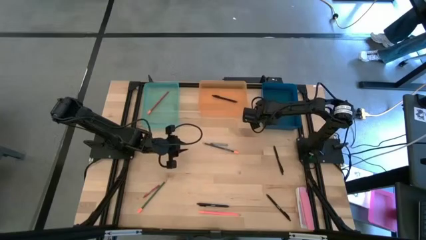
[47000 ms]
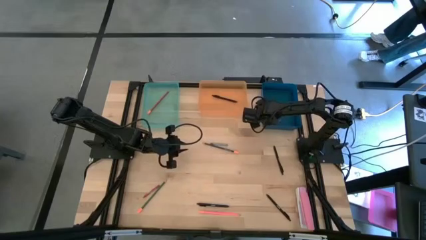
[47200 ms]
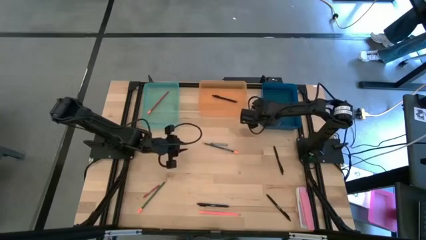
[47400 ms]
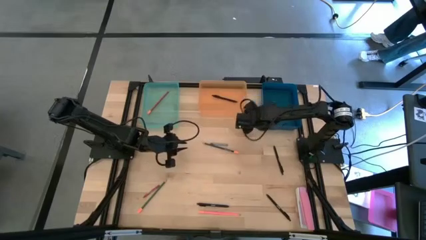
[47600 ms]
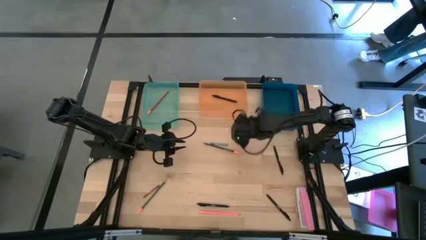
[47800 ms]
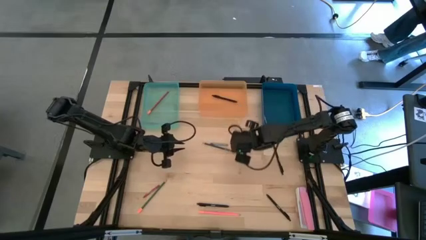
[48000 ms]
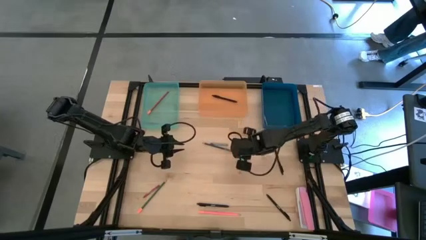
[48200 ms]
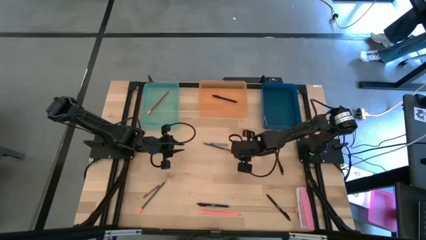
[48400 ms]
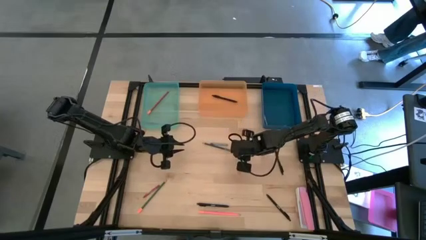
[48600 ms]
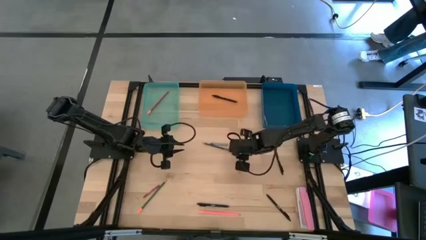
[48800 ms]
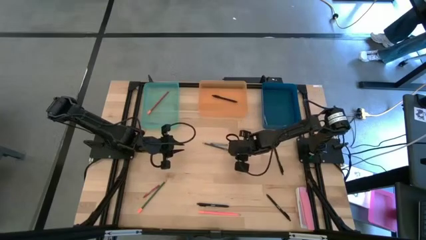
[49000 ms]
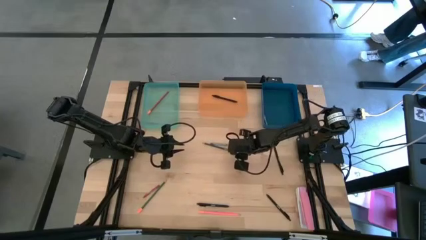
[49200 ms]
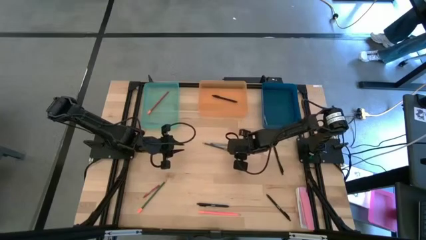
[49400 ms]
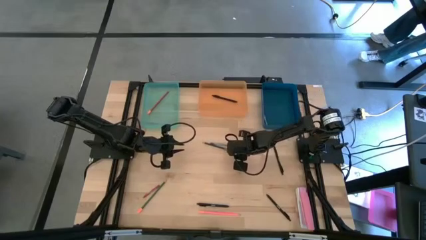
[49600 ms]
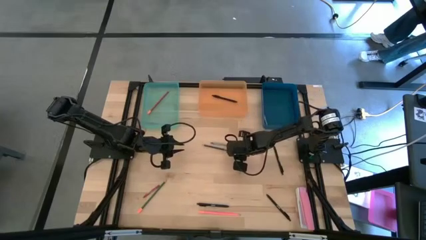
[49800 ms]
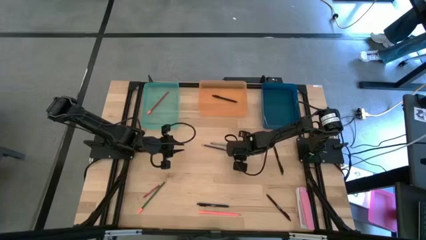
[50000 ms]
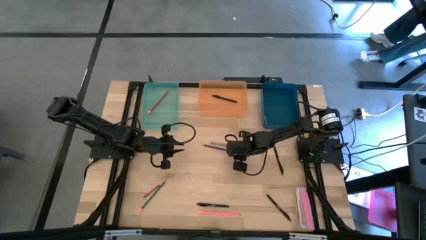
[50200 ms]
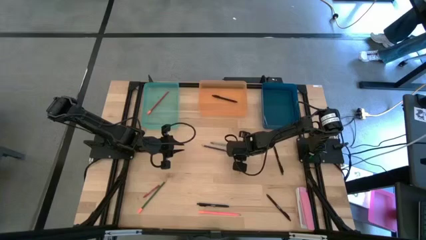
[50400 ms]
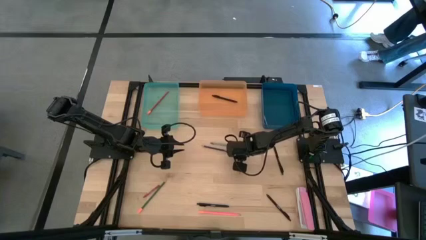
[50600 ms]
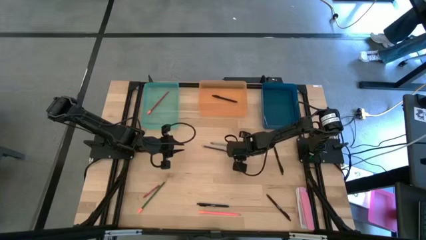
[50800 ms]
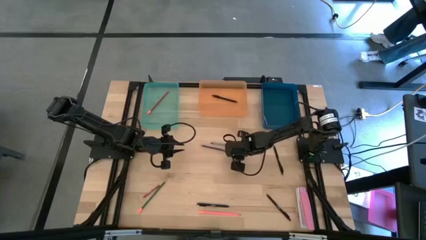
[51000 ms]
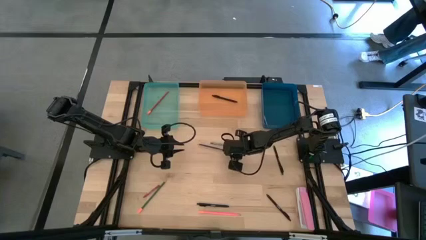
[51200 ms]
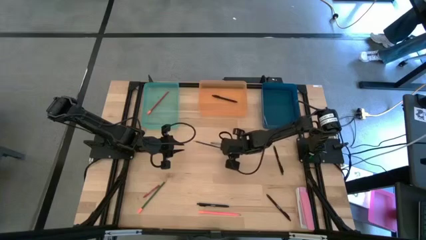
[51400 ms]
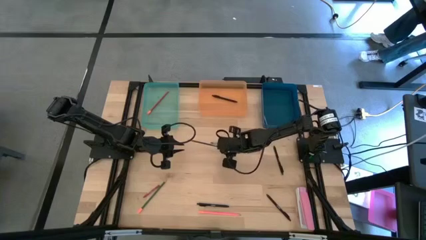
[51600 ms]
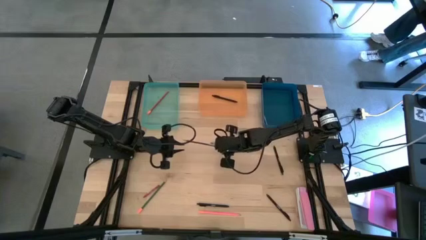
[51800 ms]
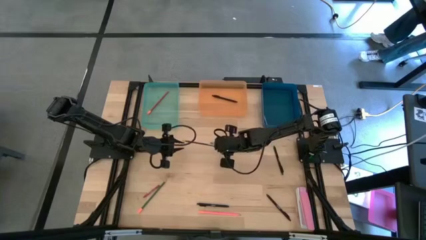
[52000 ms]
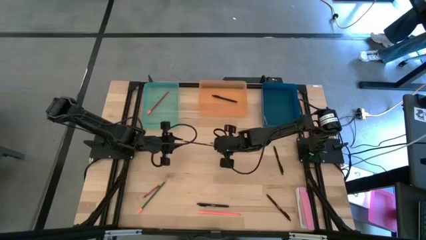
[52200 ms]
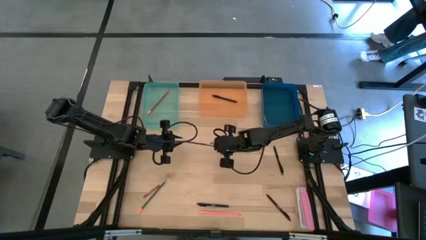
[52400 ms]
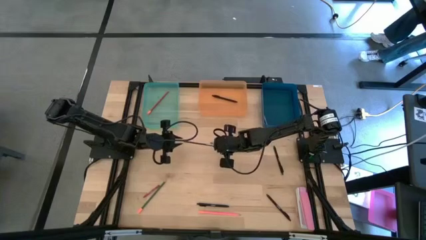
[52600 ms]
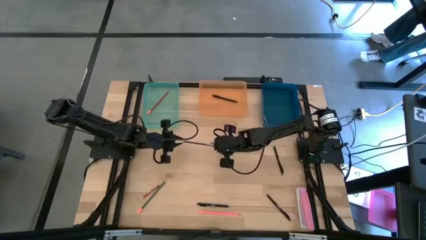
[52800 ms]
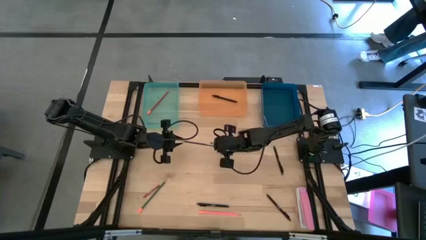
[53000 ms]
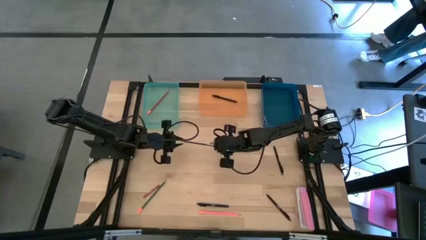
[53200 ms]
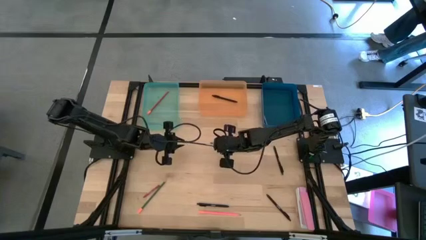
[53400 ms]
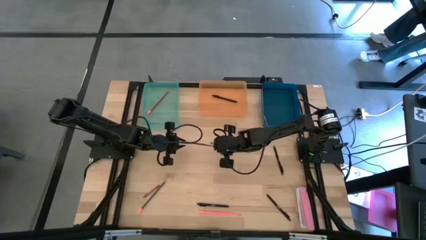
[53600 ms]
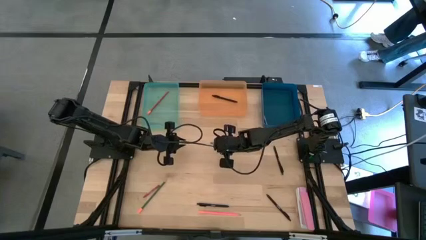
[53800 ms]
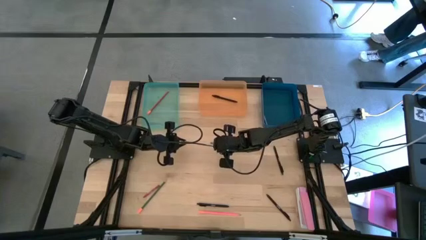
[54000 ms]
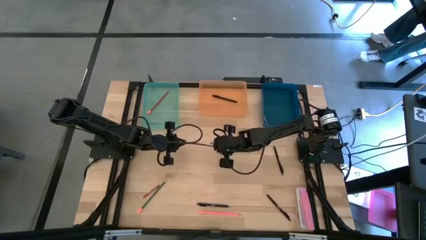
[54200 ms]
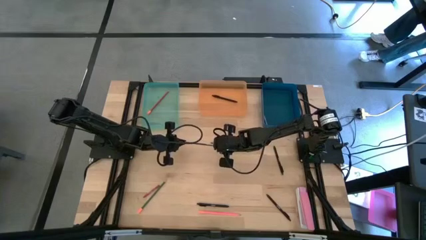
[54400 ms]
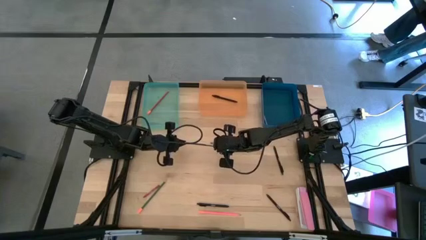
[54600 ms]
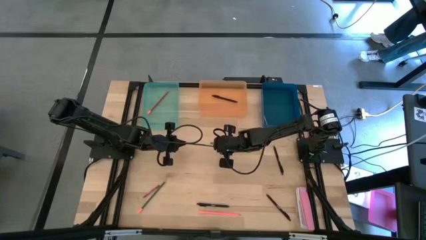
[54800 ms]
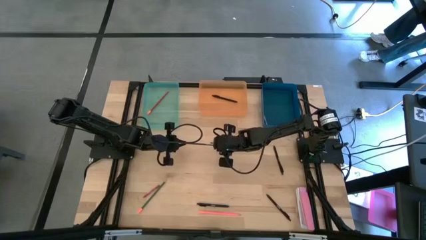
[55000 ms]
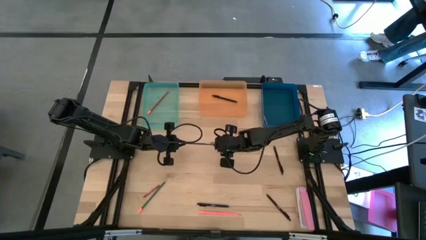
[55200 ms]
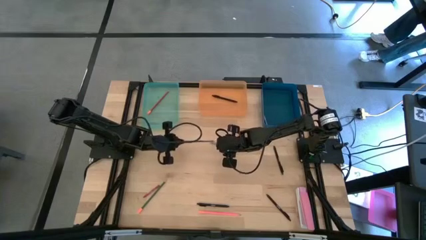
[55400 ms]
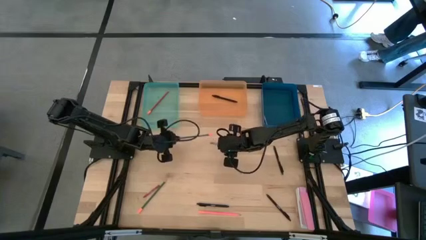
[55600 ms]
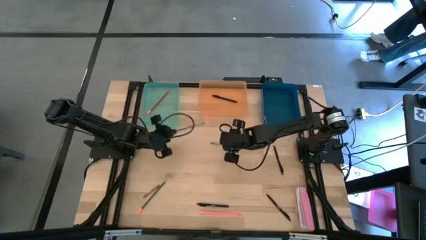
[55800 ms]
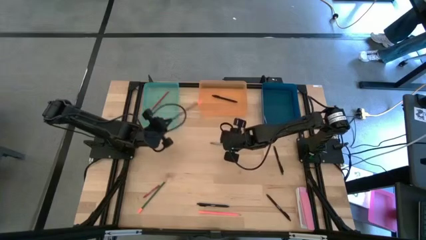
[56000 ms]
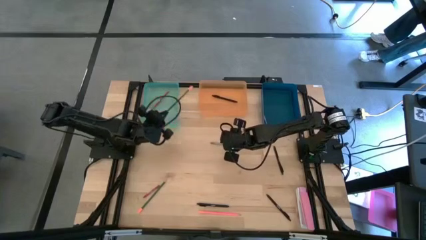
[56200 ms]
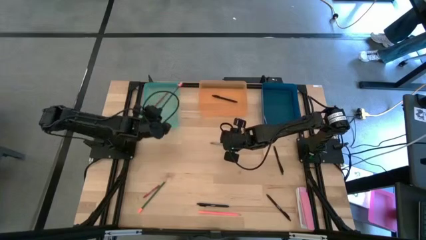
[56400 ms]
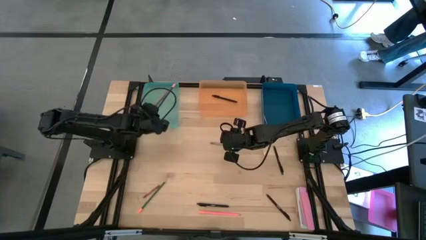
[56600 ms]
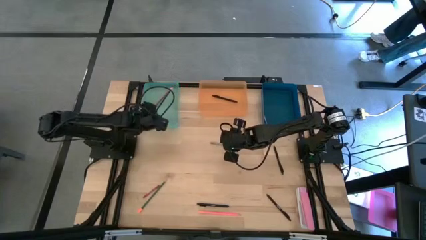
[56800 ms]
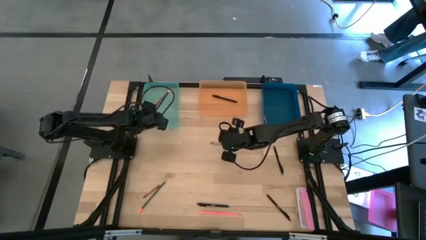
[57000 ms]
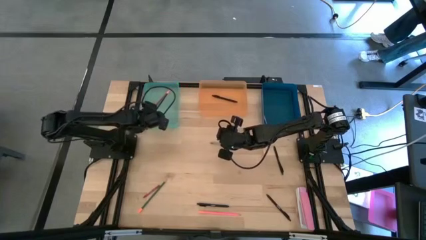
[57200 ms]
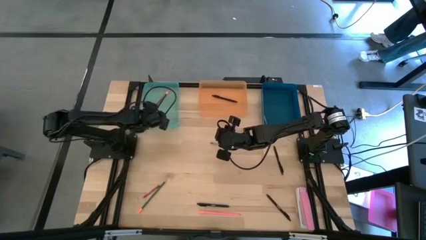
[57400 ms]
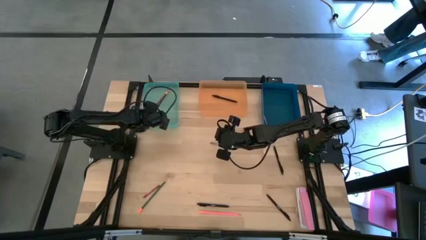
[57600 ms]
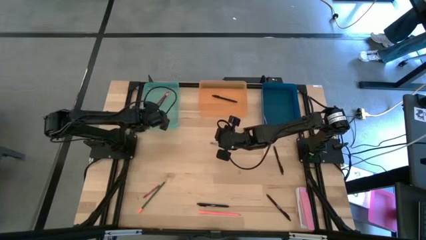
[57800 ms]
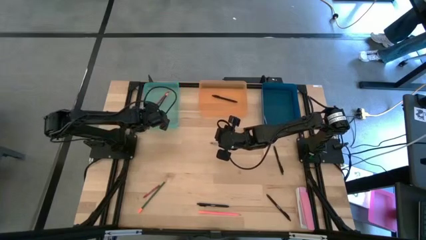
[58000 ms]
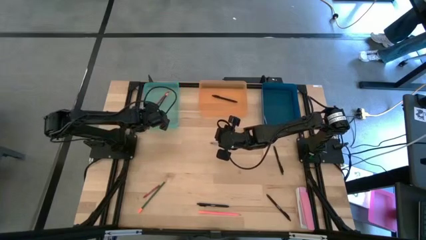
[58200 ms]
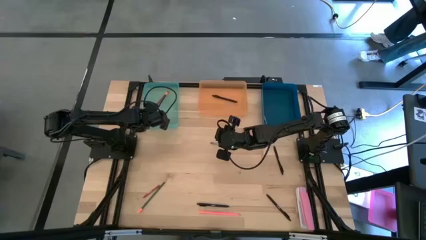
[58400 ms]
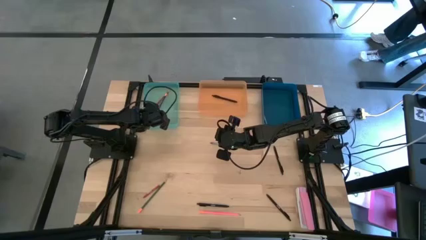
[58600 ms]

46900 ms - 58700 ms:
Task: Sort crayons/erasers/pens/pencils in bins
Put the dark blue pencil into the light blue bin

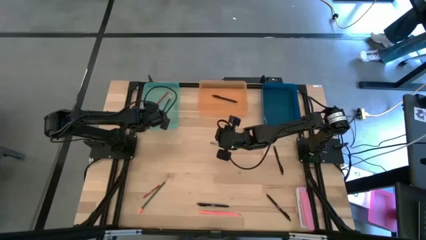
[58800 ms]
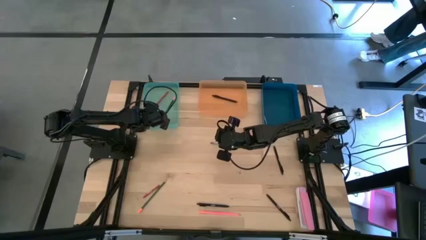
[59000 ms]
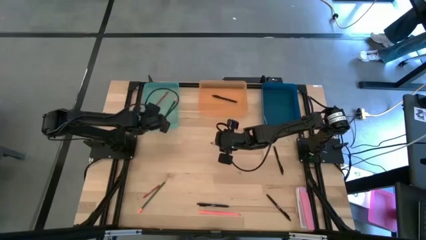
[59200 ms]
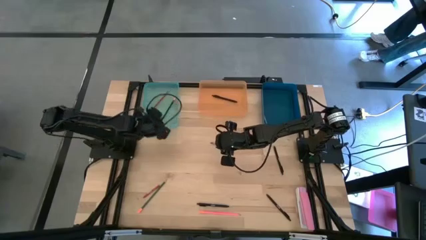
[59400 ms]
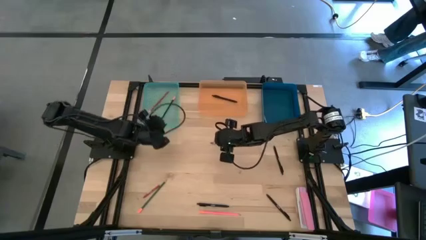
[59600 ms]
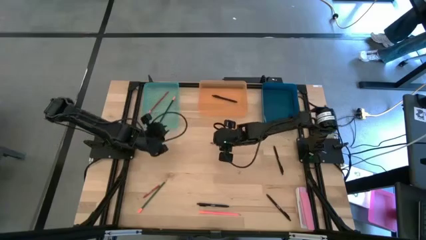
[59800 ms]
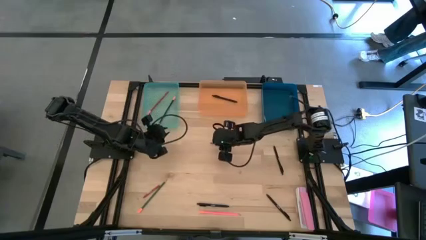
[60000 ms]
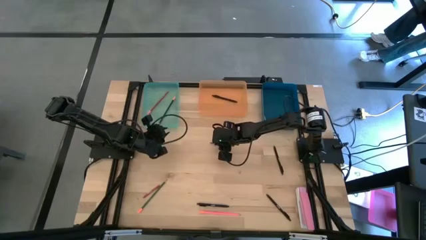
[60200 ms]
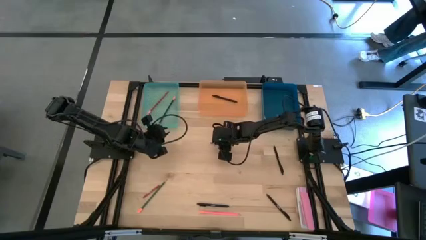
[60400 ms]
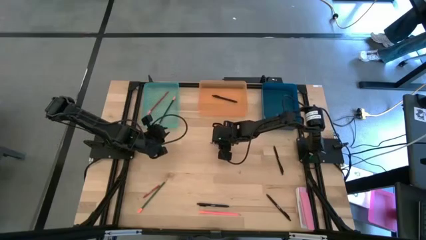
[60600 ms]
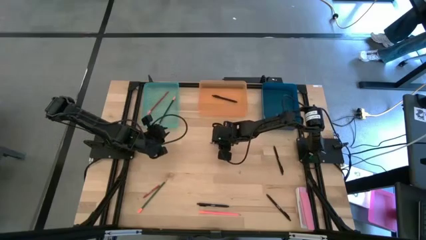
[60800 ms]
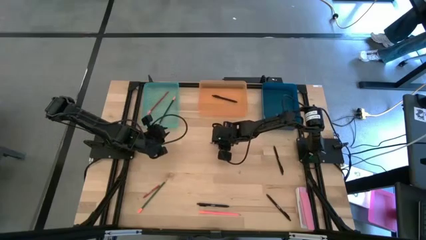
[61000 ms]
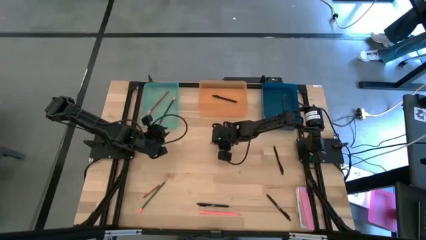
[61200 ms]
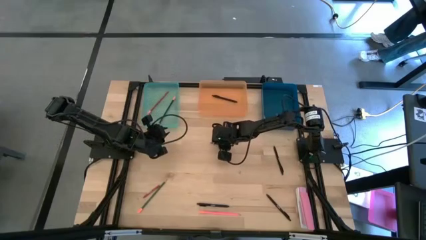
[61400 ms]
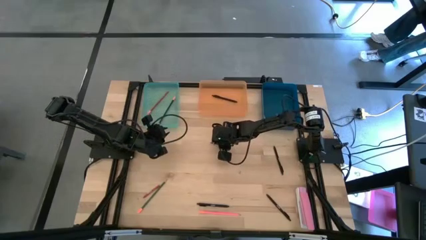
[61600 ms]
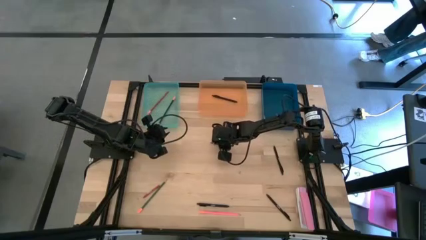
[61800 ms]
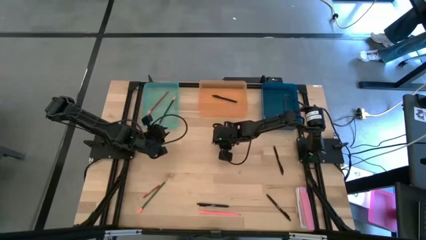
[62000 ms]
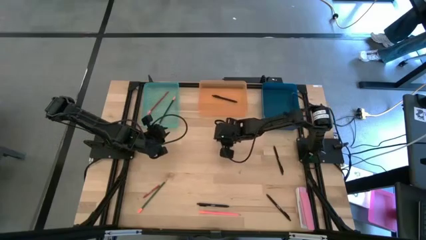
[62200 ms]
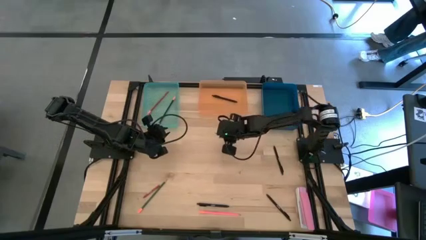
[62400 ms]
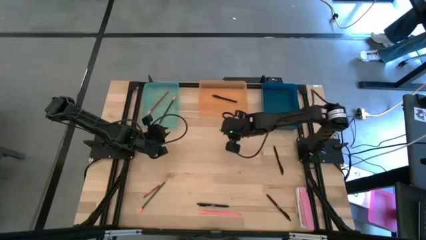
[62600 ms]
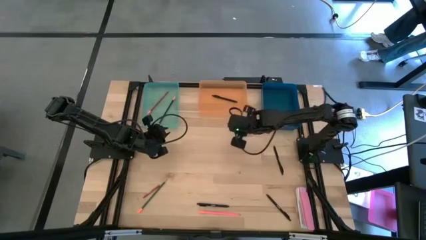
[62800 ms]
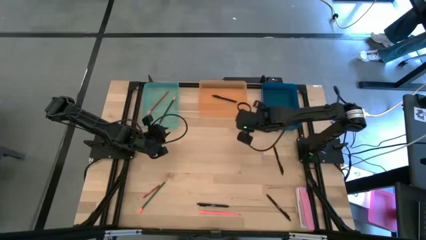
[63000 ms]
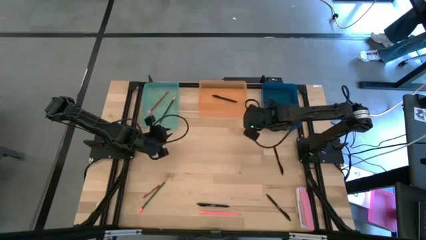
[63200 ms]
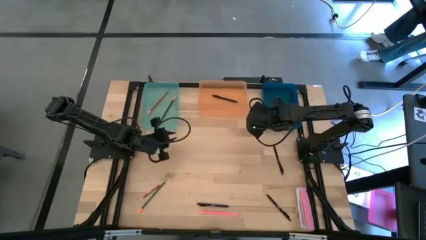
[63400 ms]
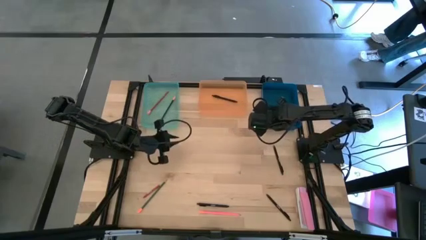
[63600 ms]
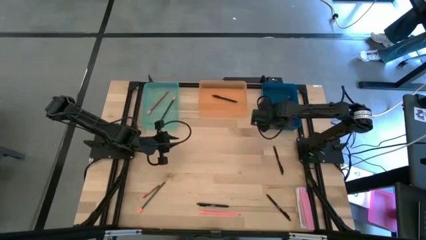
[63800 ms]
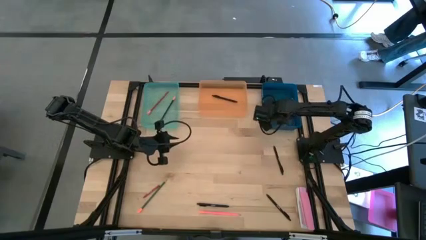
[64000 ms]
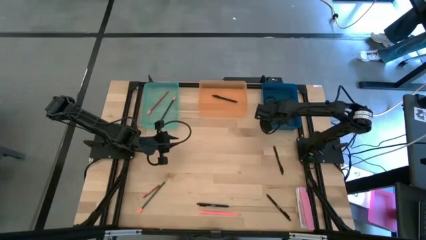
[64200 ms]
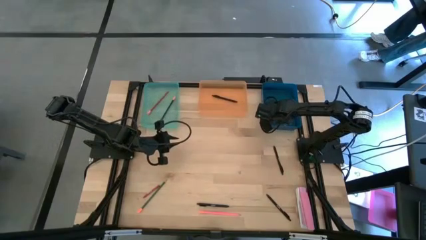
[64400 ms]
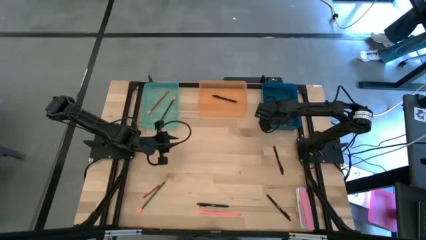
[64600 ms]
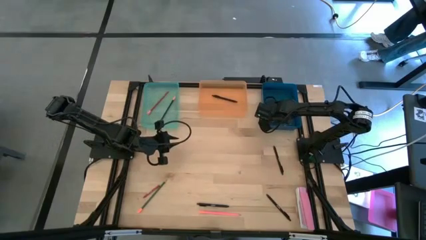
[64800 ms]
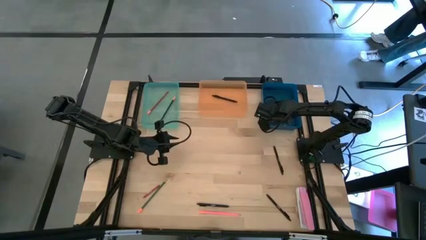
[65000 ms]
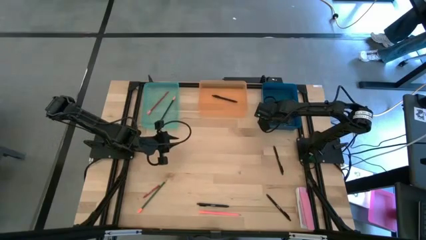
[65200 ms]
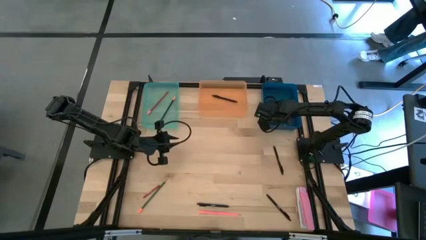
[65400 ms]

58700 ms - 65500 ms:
Put the gray crayon into the blue bin
